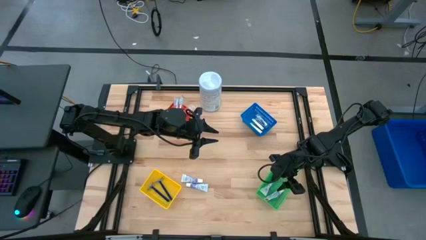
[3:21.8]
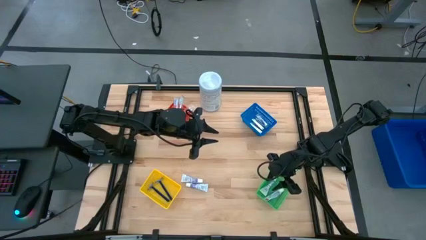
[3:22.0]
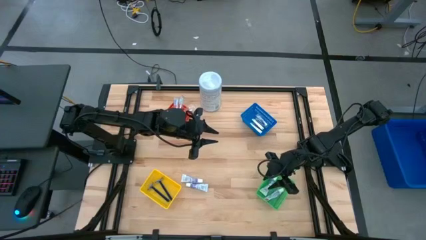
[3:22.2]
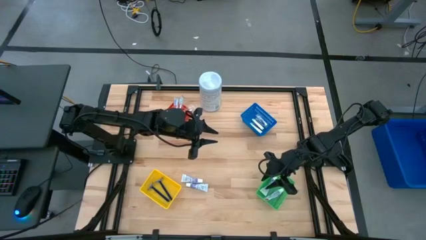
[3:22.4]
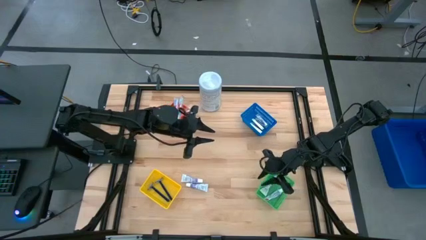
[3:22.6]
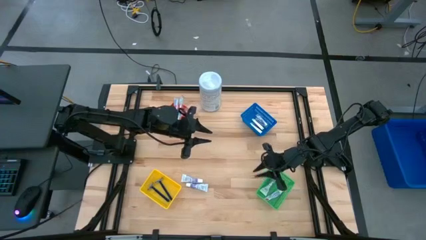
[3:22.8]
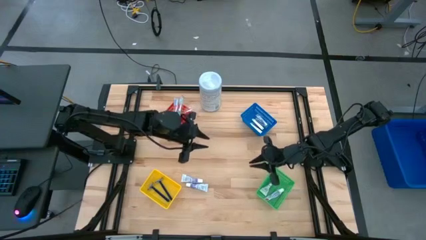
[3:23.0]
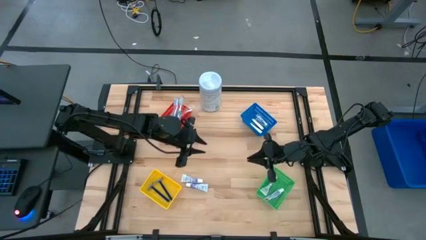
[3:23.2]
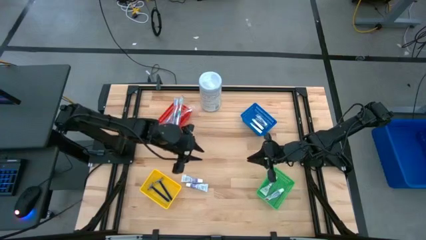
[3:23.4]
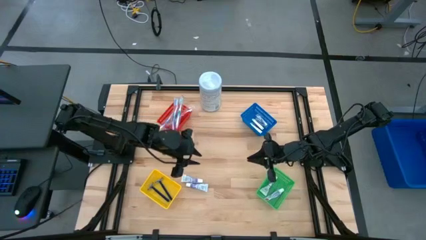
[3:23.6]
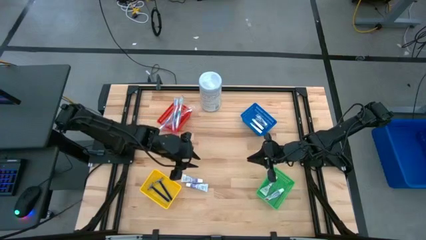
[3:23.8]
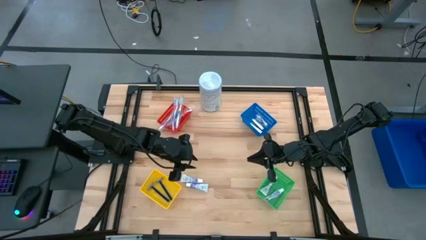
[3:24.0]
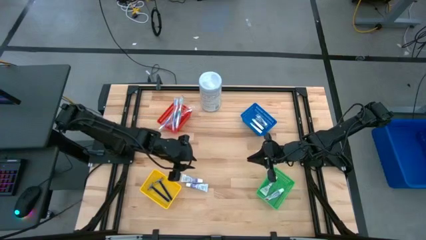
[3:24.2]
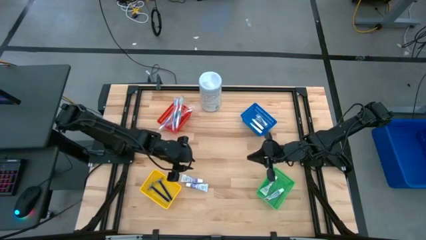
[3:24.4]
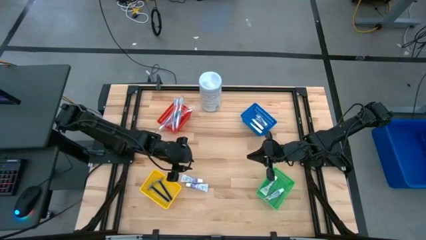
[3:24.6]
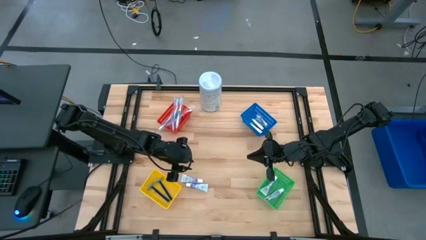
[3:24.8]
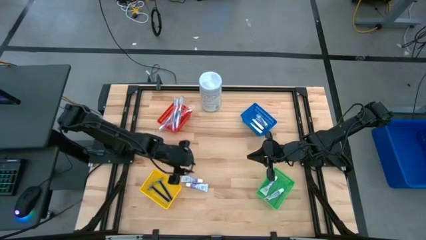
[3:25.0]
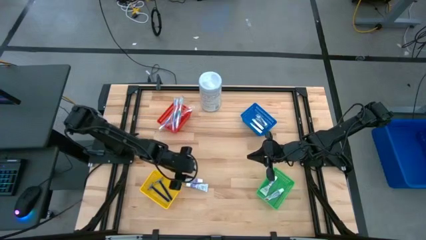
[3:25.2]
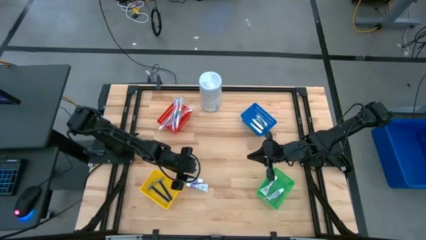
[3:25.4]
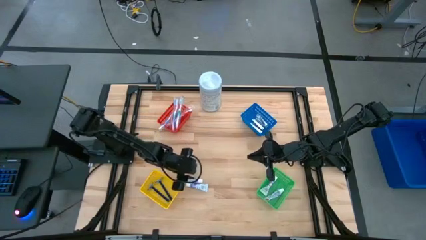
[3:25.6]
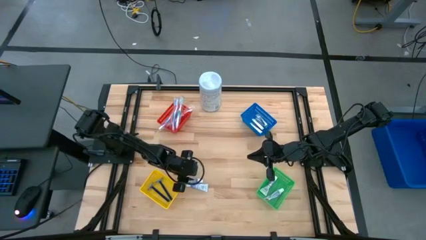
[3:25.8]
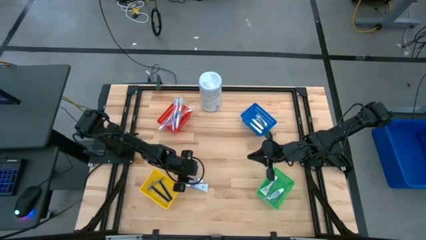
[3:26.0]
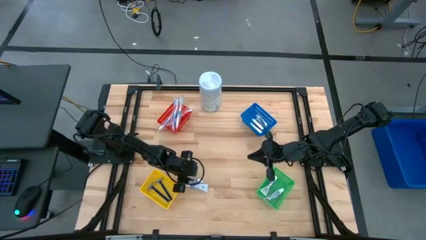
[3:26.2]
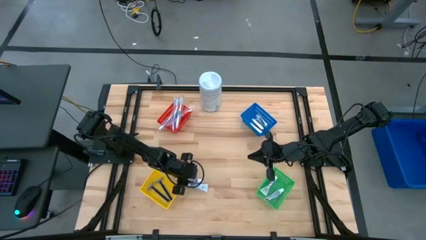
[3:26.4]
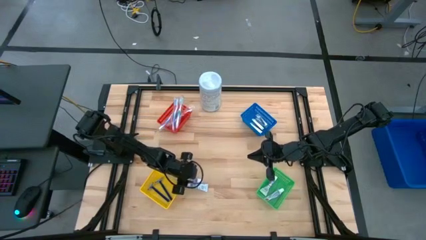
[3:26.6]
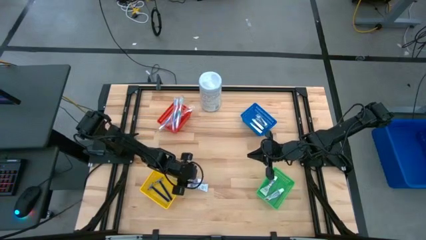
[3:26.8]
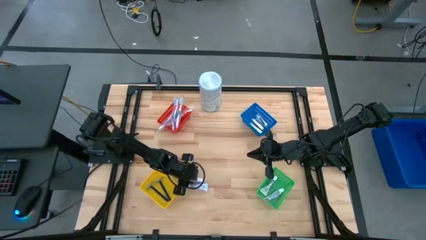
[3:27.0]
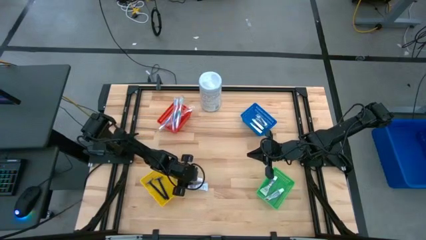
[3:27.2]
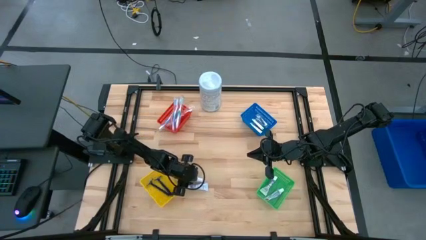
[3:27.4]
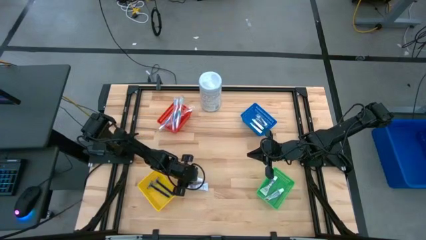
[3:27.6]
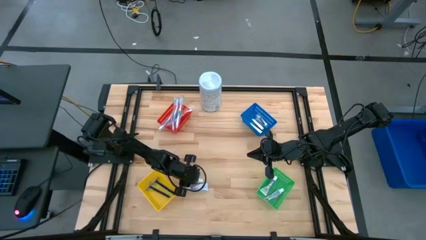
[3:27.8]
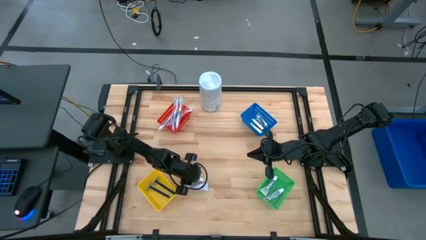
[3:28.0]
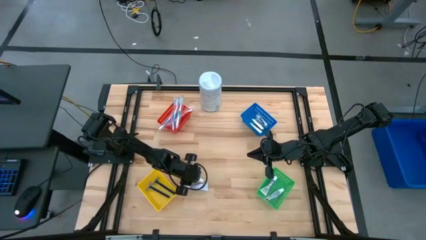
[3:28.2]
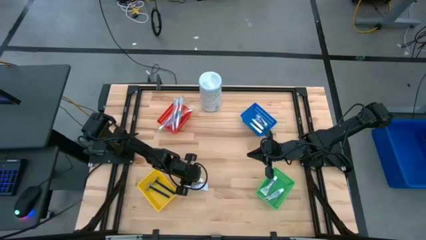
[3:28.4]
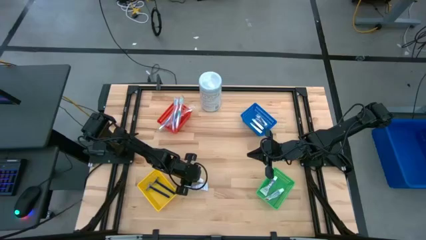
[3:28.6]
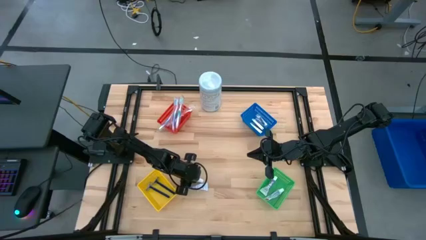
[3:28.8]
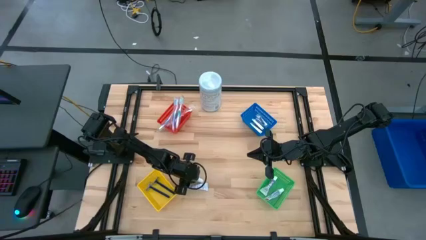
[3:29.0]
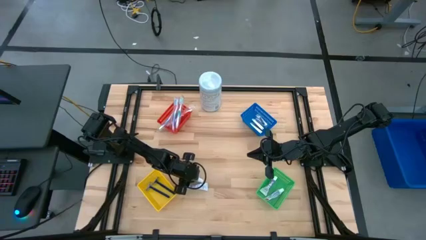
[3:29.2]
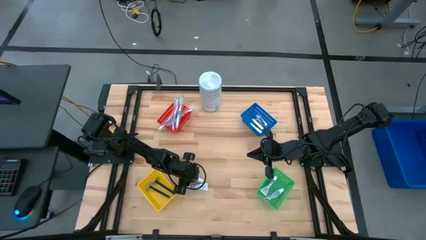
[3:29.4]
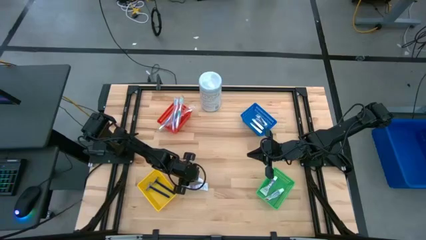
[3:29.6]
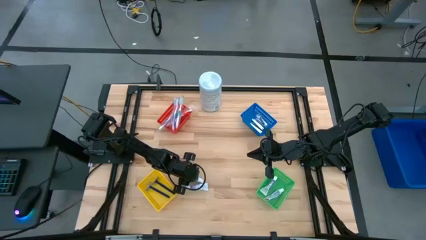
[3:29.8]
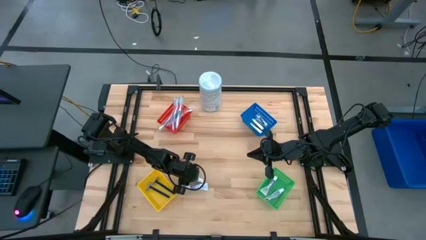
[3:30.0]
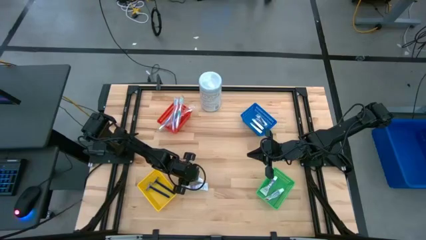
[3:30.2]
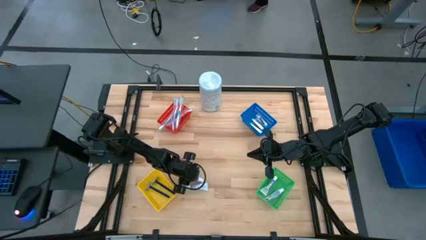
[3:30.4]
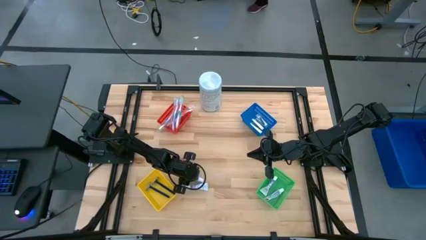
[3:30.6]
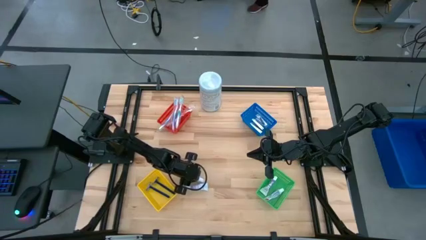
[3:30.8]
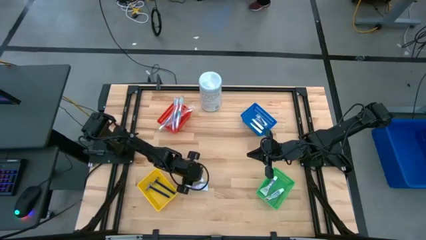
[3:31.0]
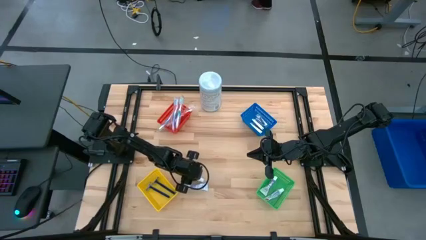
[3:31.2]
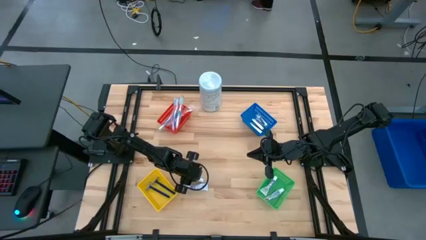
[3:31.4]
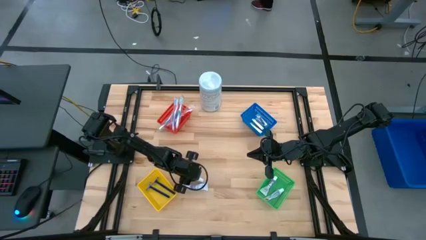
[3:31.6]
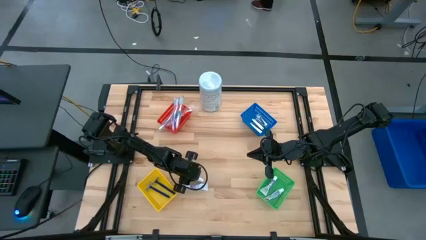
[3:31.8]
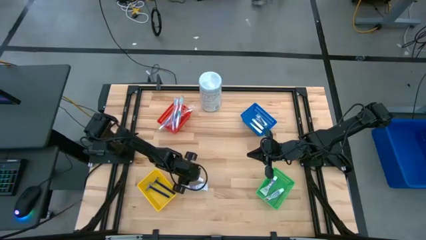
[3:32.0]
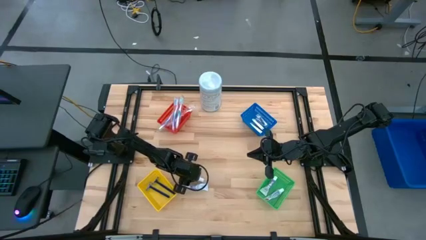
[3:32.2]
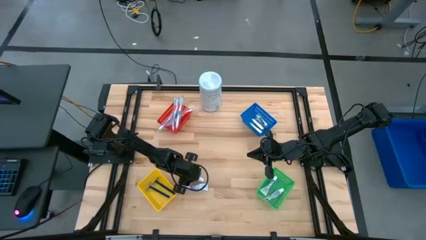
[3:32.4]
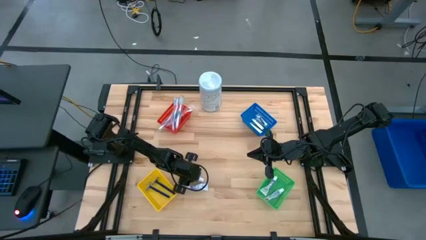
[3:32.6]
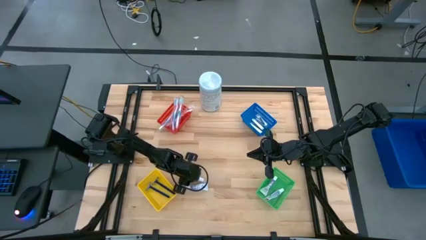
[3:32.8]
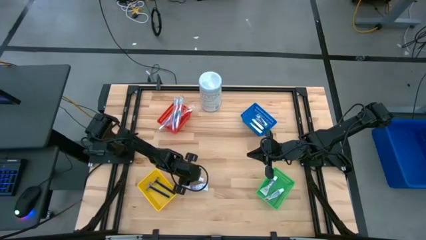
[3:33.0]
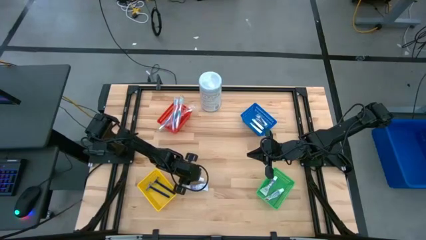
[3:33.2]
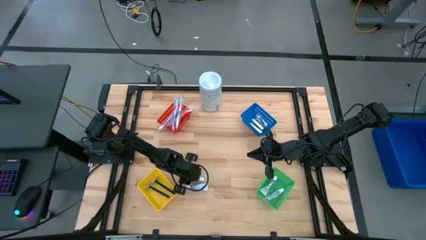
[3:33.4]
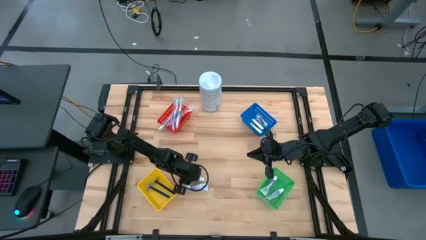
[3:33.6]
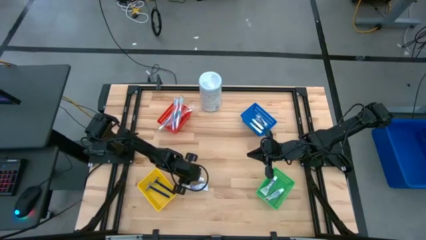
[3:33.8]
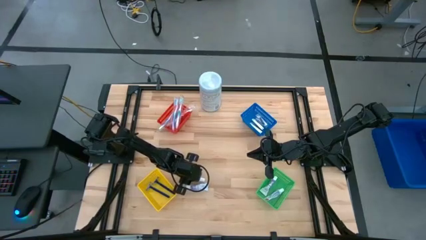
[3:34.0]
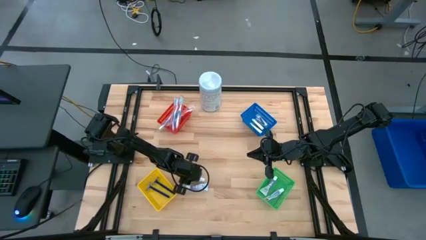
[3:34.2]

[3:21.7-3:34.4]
Task: Pick & Place Travel size toiletries
Put the white toothpaste into the green basket

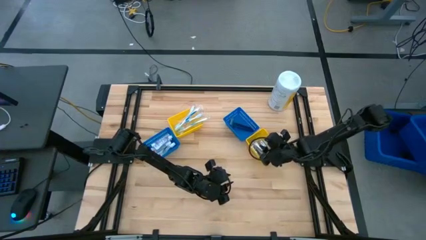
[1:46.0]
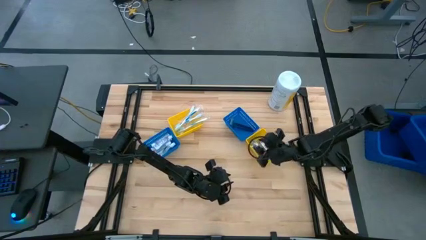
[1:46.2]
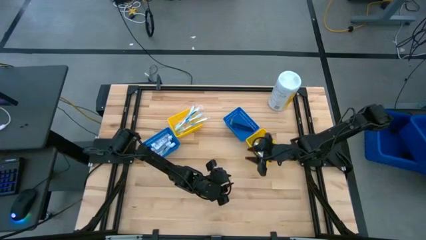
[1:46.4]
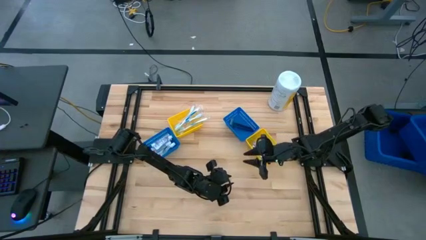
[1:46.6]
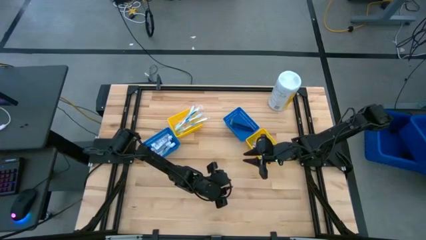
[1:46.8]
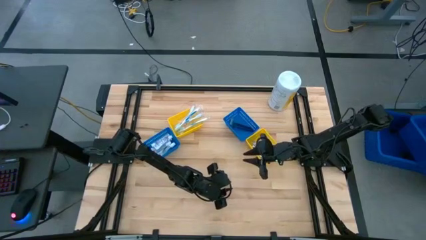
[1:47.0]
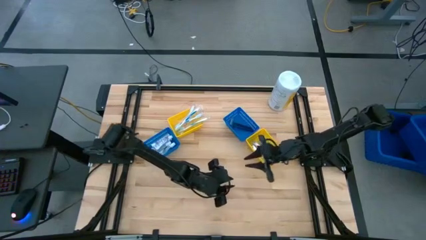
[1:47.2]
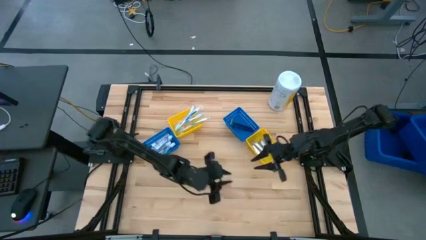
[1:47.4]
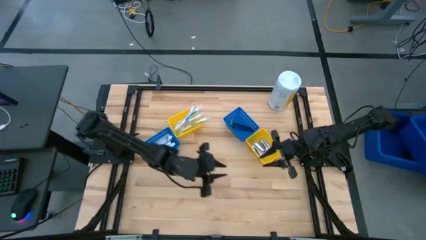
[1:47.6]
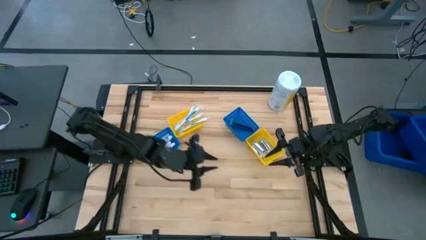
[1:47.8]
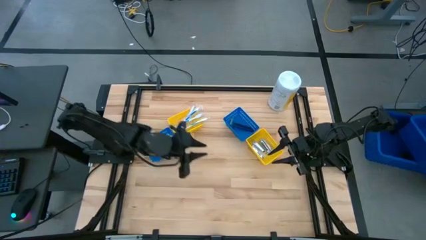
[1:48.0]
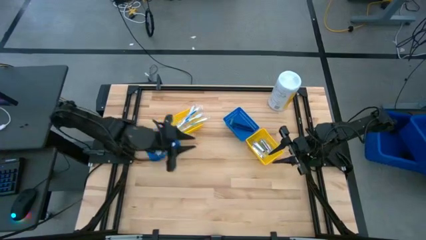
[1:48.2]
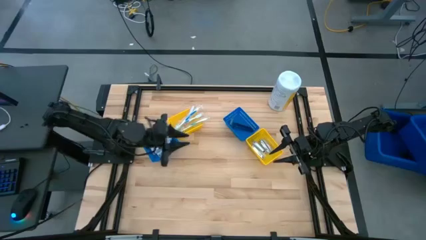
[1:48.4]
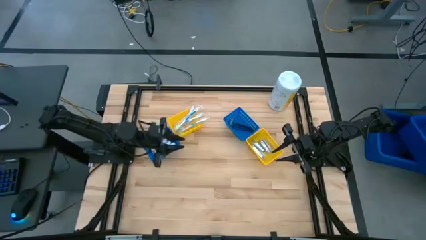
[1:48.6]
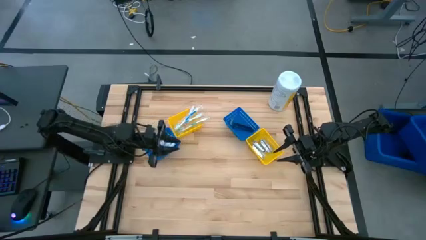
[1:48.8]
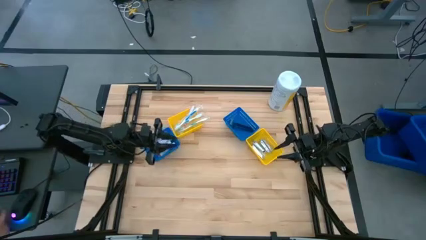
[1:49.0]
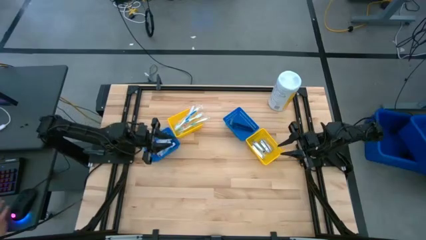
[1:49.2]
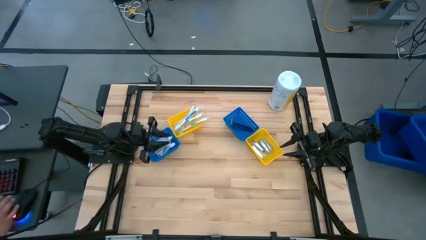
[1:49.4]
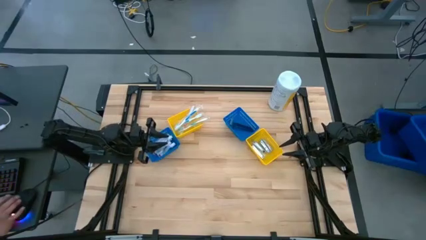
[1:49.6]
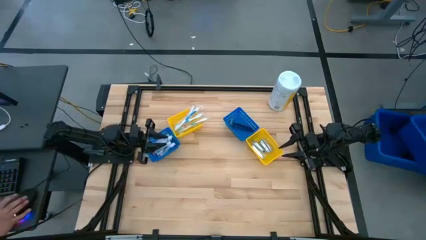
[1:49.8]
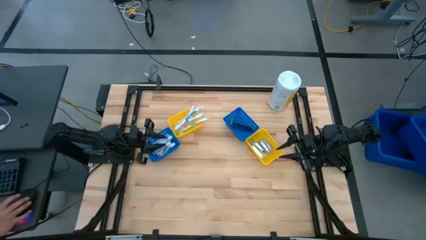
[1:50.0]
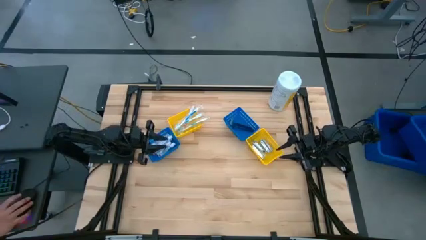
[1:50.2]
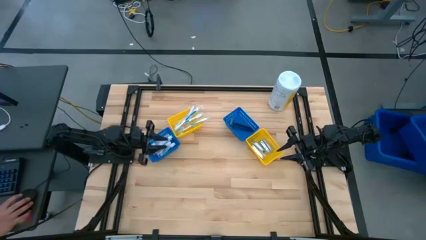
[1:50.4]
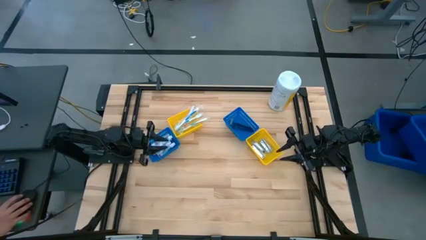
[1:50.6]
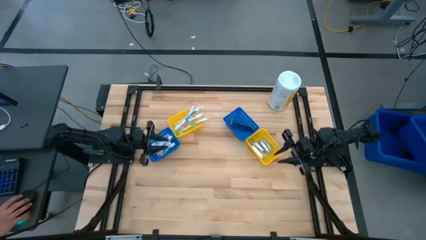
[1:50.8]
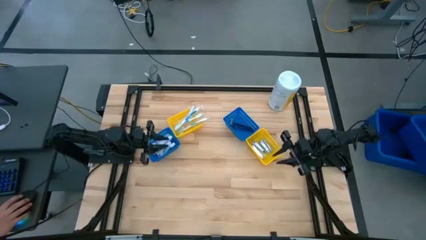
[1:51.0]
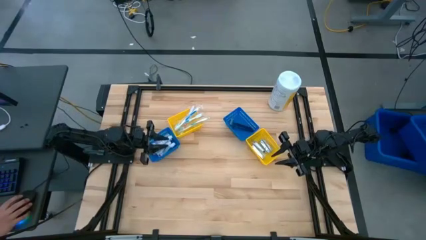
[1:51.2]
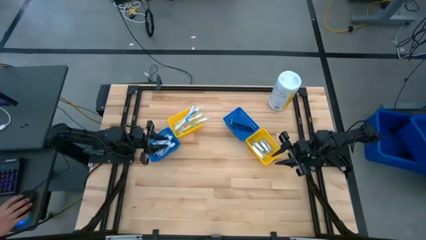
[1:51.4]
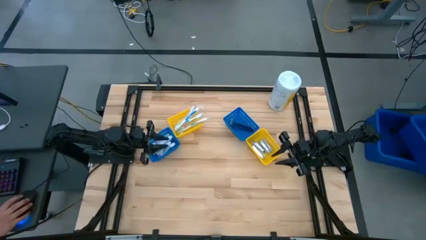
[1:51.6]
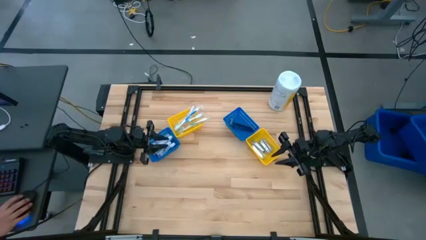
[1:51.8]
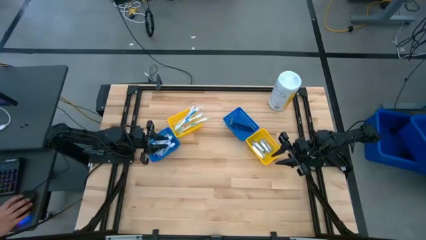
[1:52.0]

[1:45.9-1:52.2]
Task: Pick & Place Travel size toiletries
Return to Home Position
